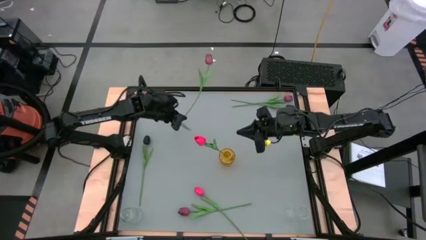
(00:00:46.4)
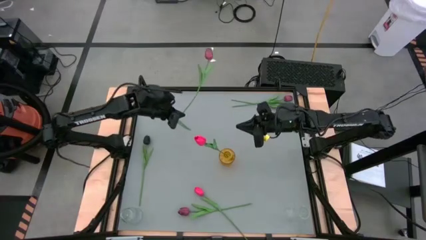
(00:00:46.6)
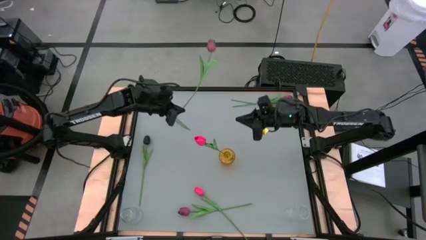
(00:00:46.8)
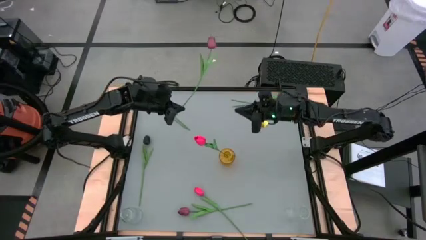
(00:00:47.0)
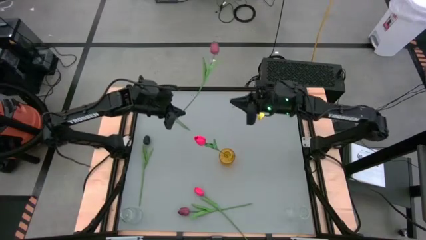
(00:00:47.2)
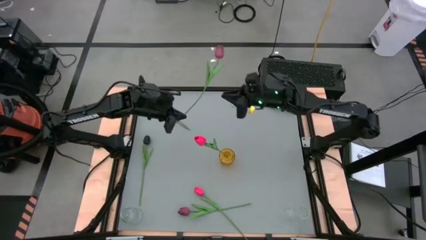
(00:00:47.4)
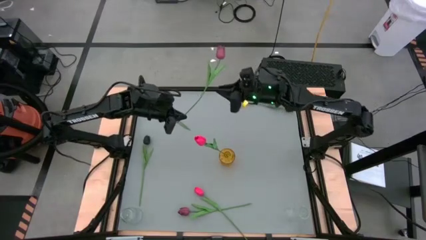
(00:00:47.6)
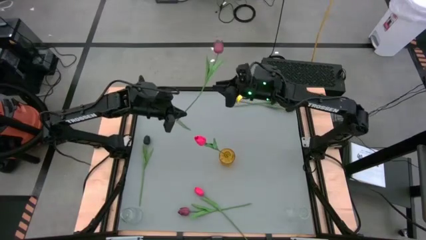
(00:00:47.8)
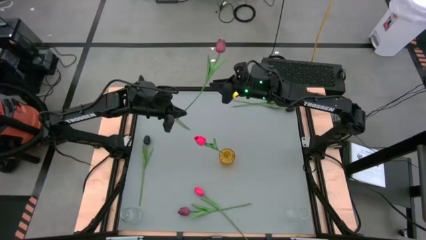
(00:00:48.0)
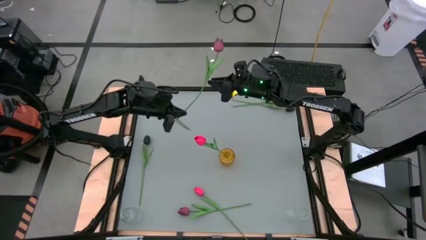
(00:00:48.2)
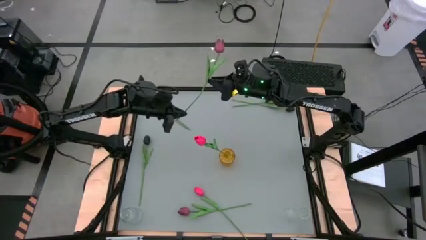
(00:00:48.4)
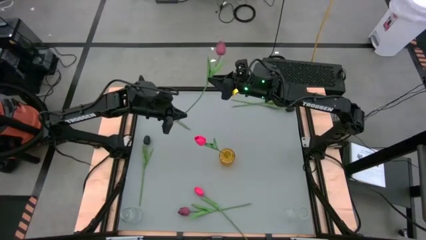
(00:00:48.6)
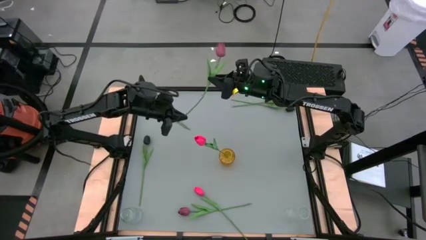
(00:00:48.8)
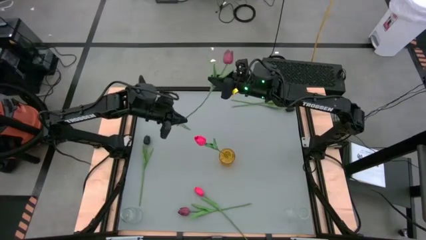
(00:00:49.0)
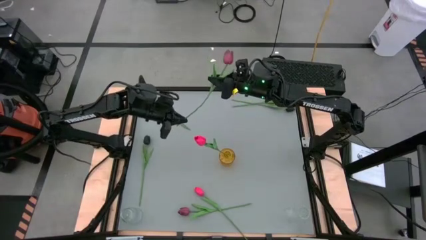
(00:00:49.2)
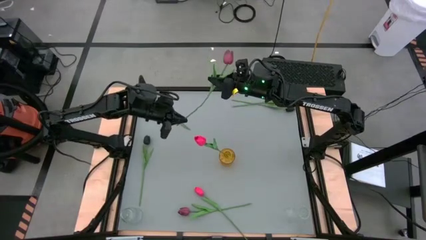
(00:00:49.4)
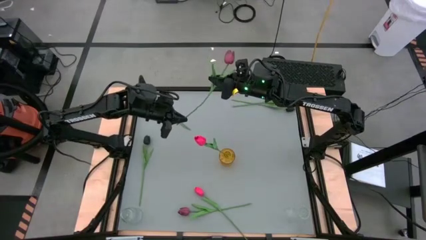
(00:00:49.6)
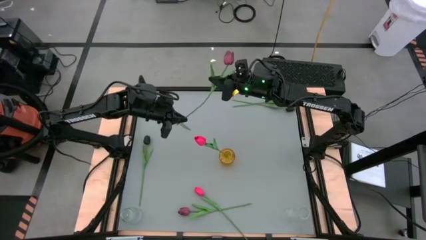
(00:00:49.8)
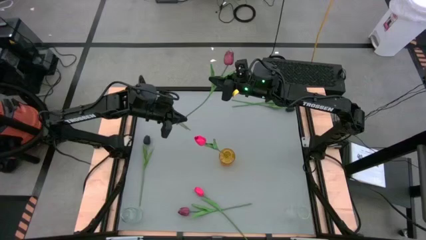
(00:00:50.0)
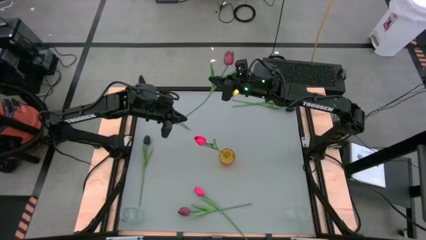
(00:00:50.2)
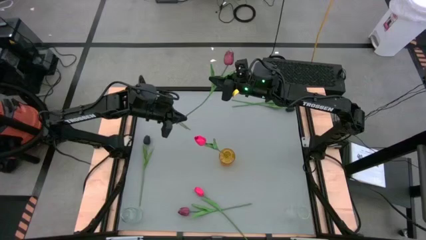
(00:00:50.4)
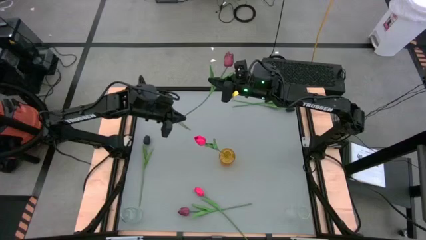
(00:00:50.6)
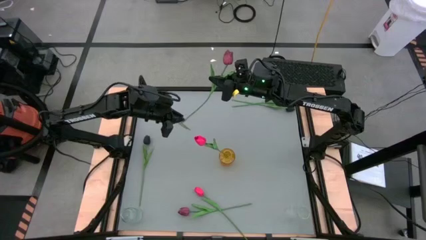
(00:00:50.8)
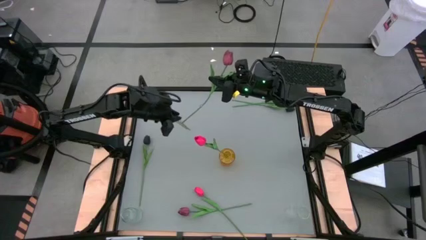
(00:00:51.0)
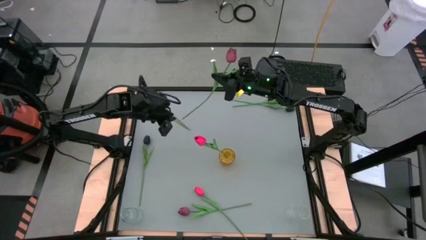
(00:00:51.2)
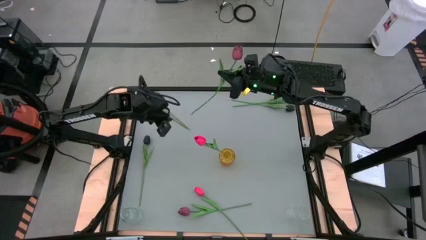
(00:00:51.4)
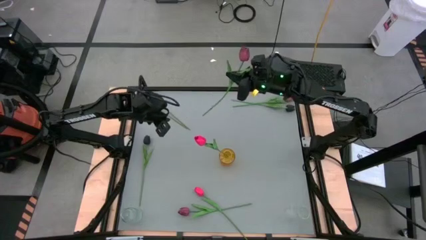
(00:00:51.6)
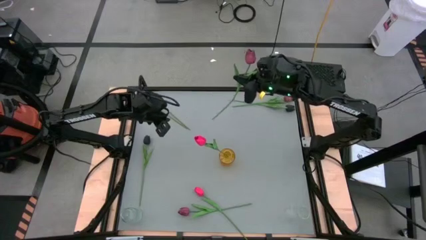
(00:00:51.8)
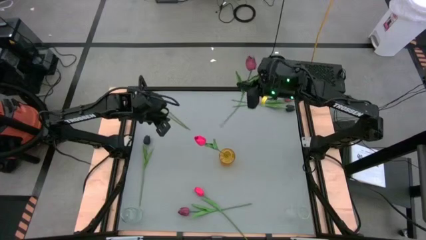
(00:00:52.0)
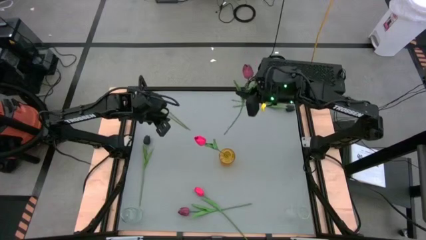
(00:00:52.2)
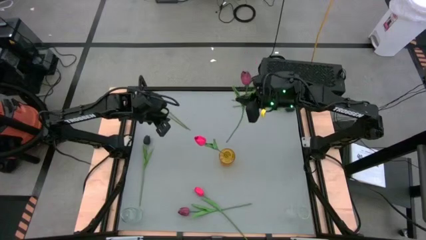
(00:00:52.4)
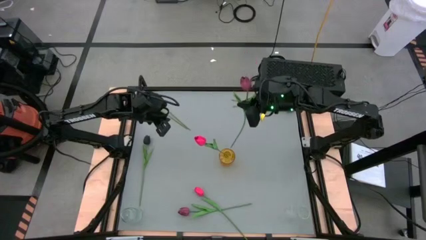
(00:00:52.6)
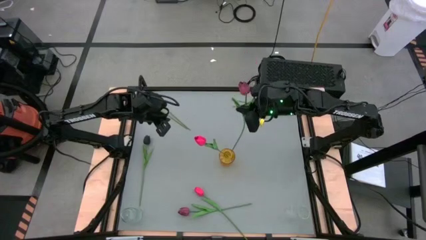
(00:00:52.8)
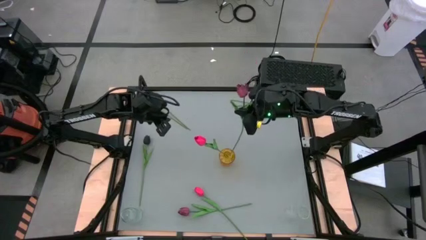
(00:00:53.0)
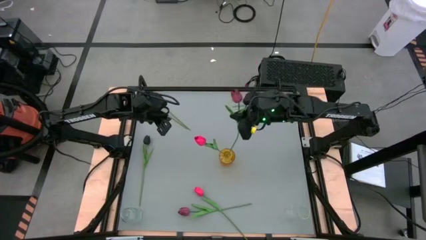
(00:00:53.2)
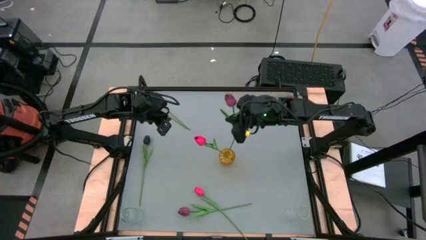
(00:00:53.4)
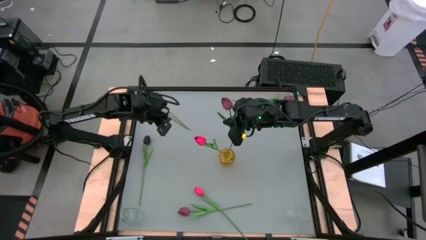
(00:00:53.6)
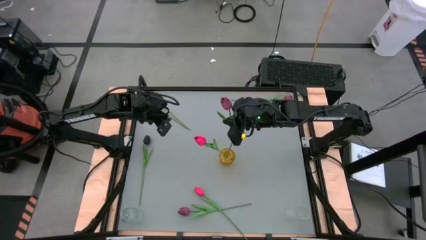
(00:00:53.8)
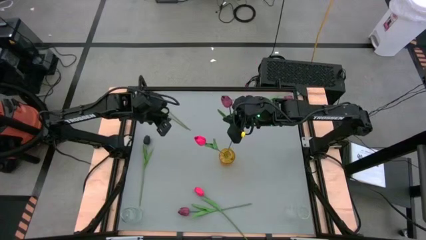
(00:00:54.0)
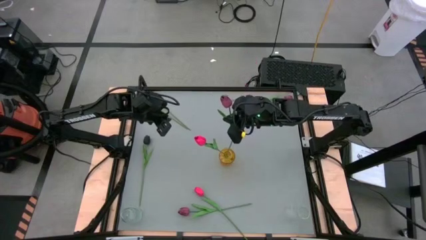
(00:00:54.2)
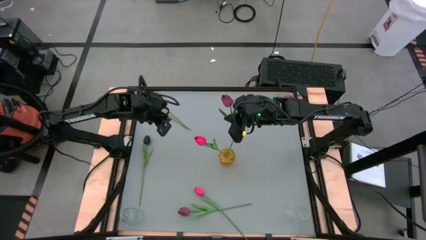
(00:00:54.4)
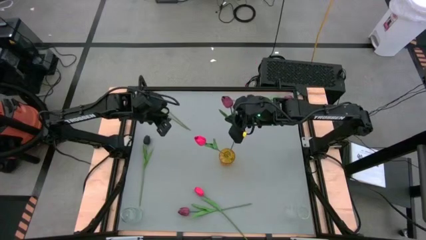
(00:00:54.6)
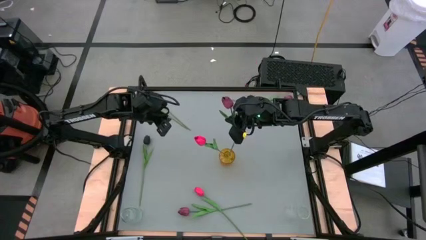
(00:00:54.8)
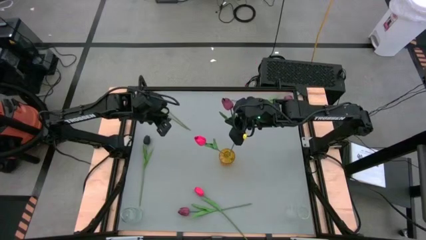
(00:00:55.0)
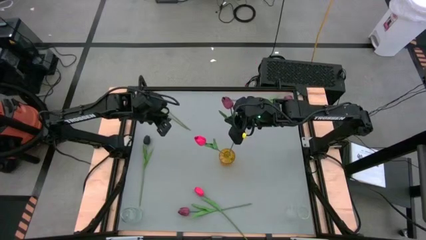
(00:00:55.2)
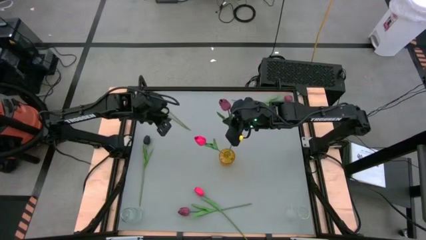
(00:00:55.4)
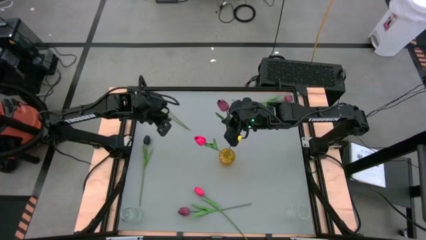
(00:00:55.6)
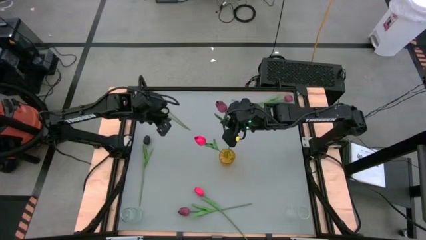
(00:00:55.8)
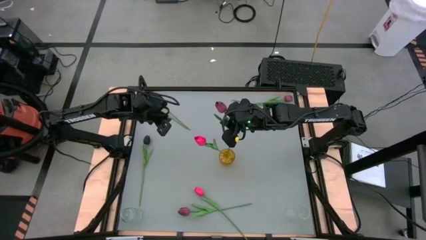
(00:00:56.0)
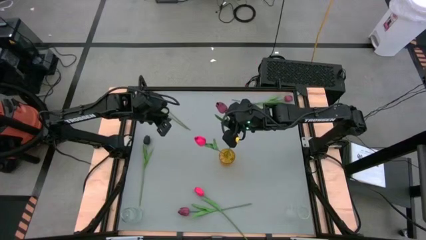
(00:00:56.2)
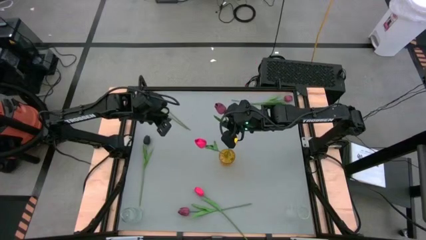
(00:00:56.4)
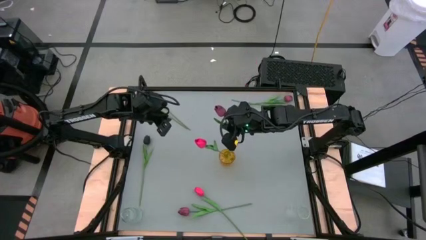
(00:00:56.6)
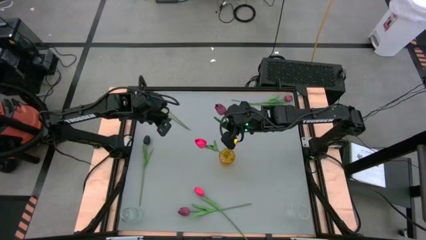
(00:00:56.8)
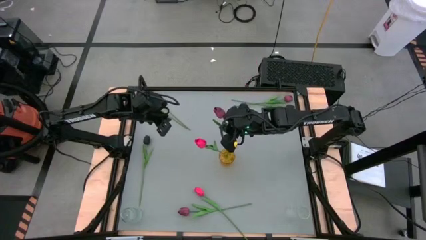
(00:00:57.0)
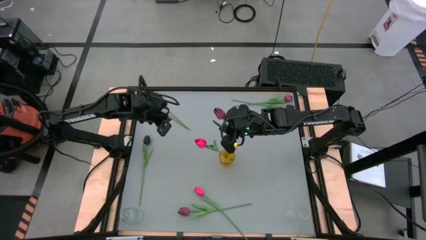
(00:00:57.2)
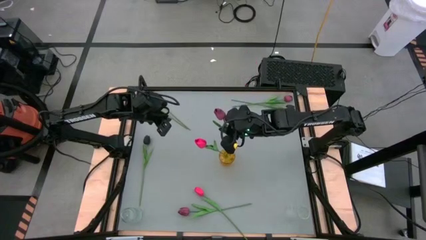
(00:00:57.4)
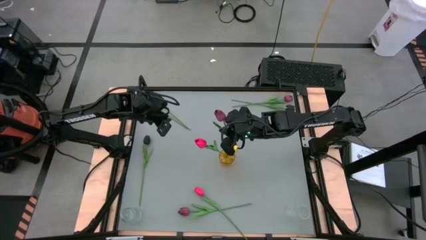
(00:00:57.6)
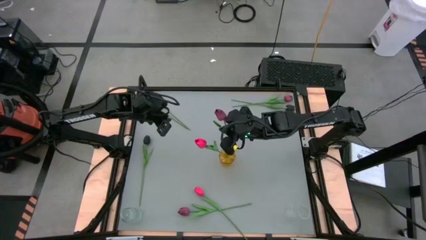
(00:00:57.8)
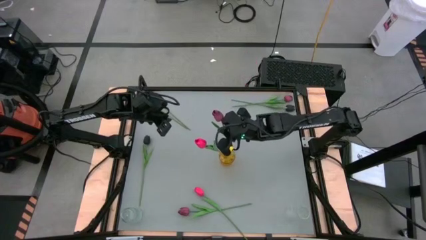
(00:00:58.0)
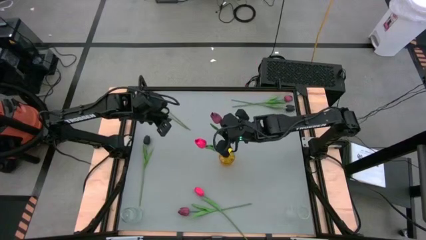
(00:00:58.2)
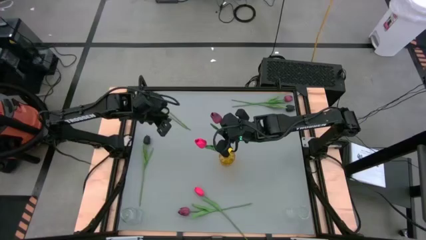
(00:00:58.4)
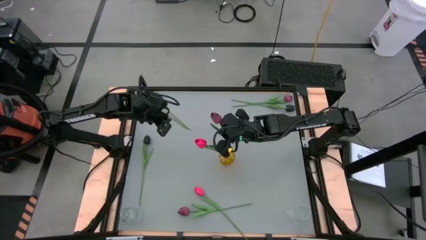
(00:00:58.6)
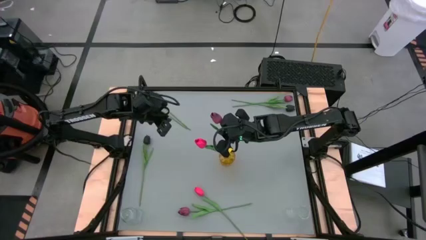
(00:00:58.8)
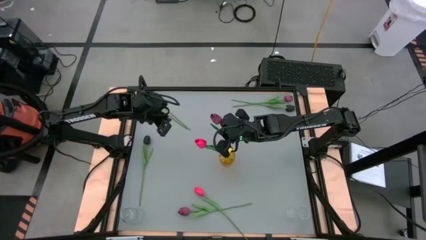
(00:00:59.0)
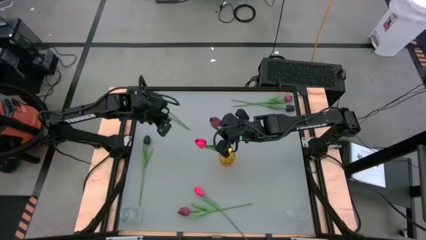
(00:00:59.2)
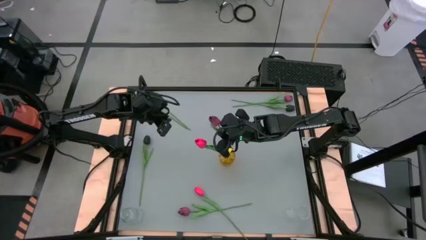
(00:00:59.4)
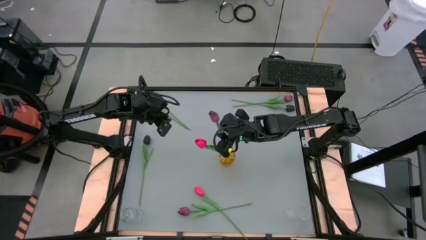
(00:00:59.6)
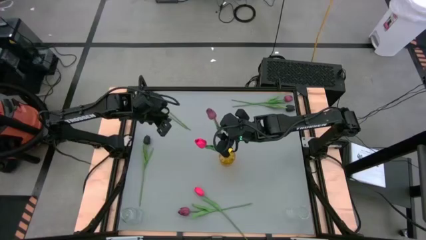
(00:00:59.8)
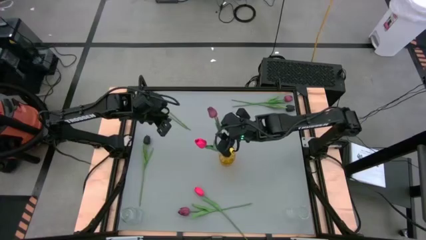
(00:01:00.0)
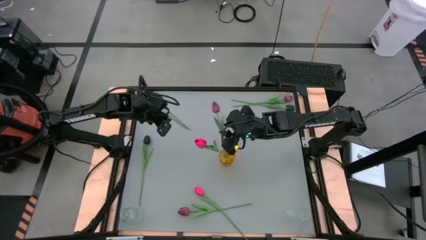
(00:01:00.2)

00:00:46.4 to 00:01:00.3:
Task: Sort flowers into vase by color
Put the top left red flower into the yellow vase
